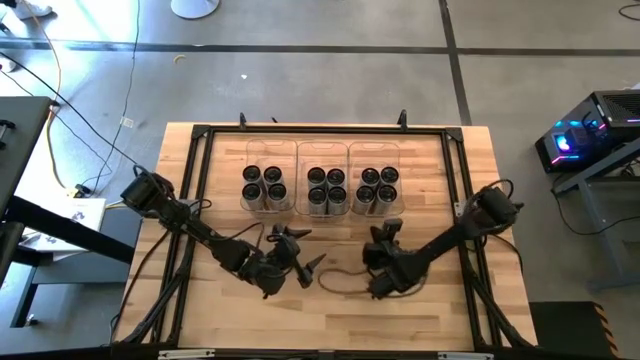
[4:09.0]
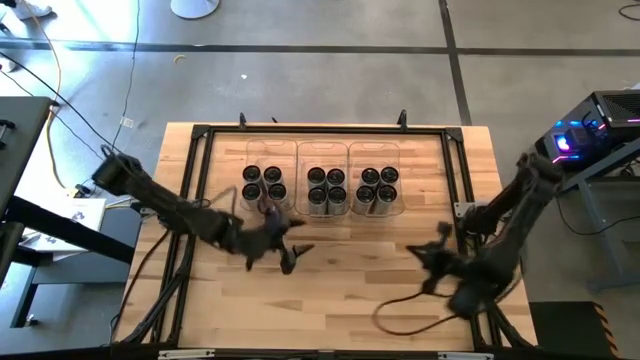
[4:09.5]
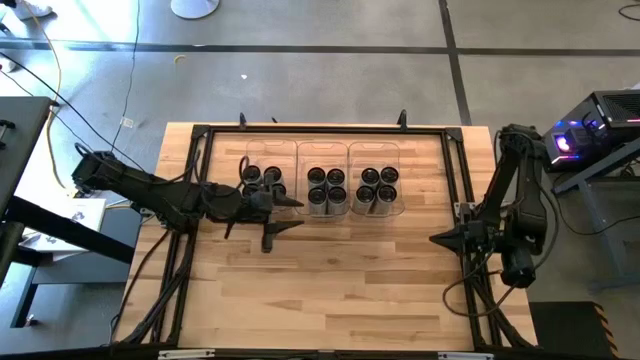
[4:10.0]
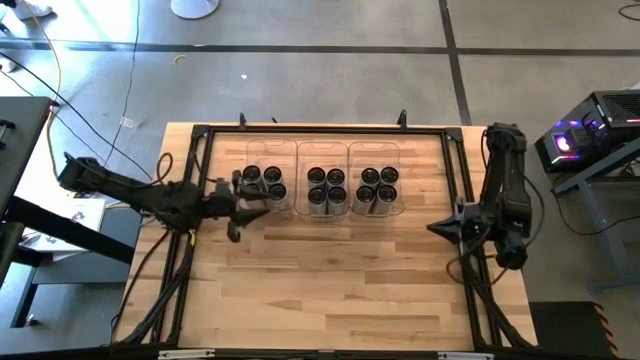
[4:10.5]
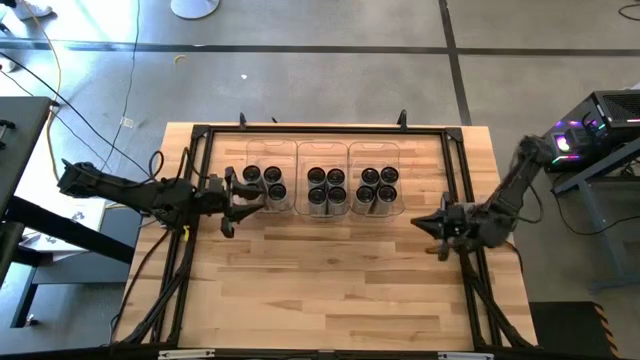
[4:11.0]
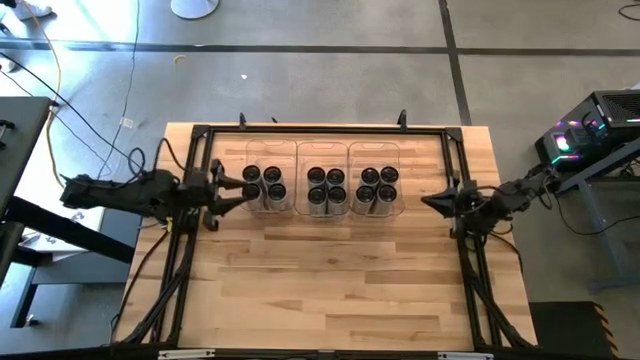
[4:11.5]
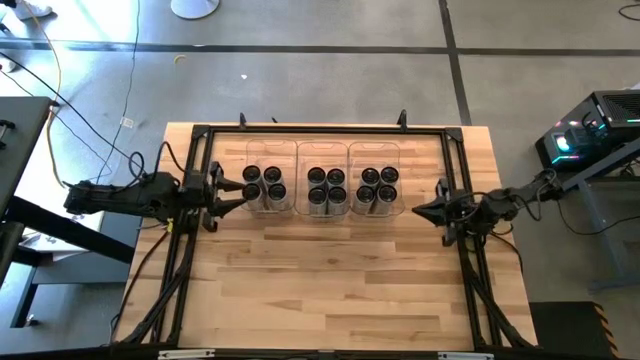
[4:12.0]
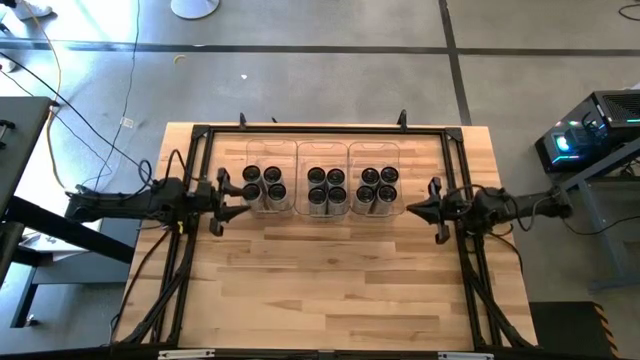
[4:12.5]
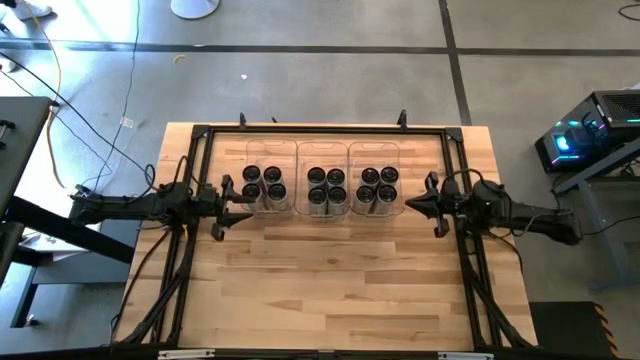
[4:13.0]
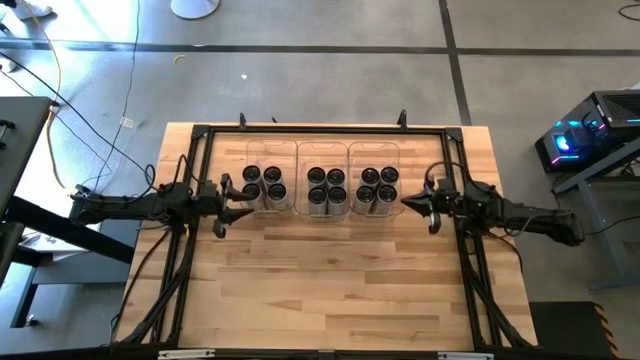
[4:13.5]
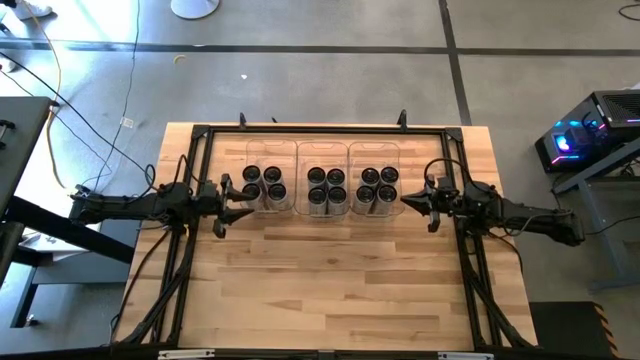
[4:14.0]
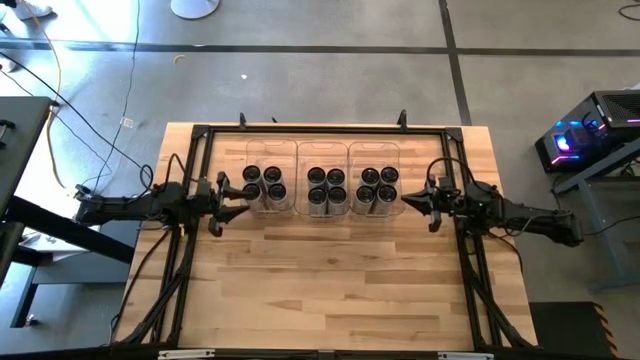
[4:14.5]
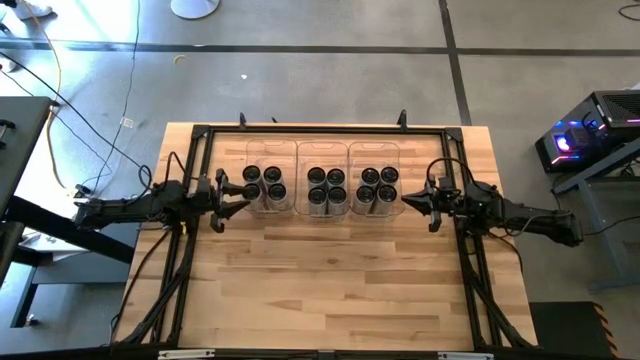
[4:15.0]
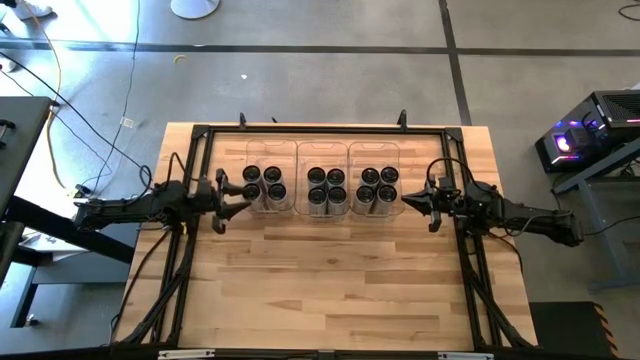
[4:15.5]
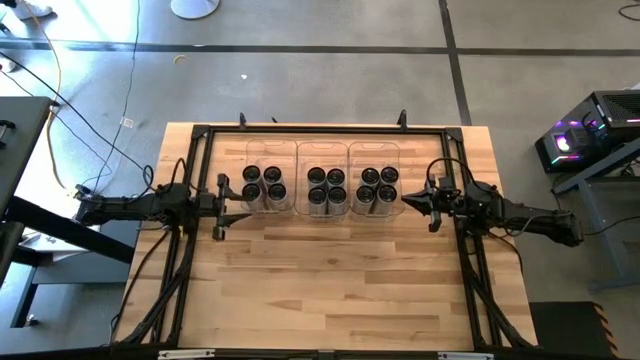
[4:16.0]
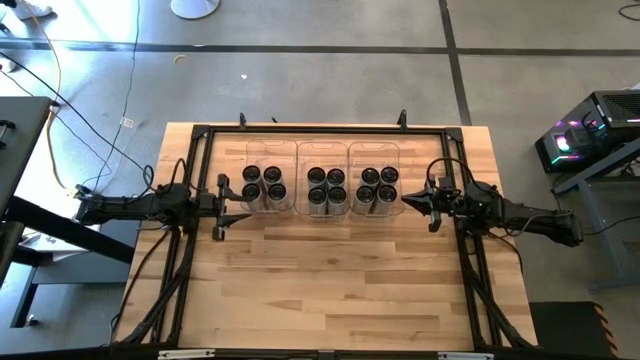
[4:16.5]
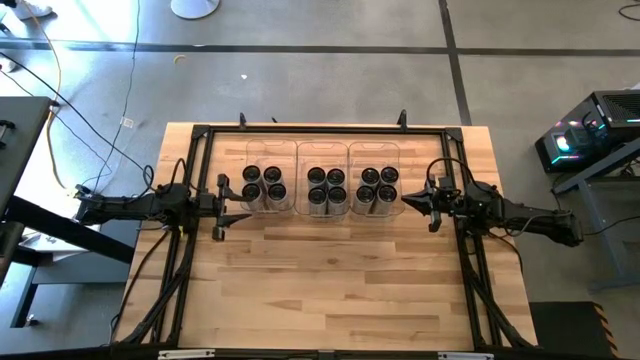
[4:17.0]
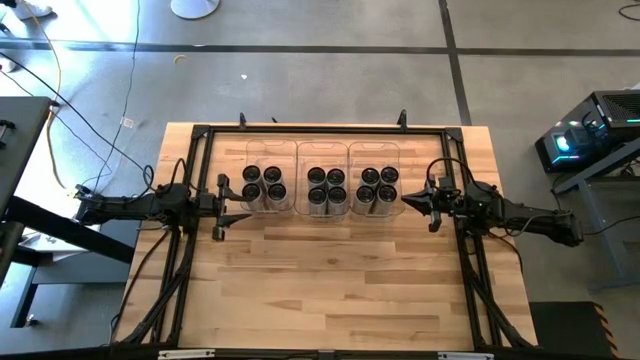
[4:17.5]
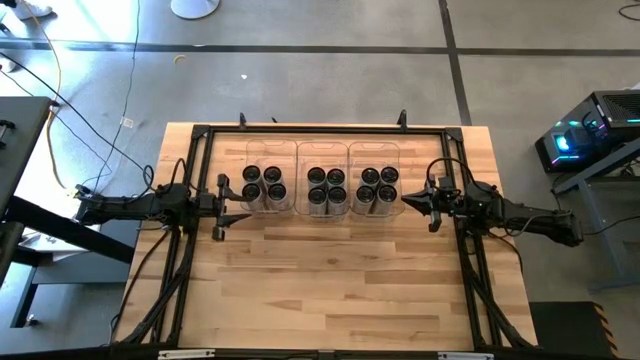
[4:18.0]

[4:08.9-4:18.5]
Task: Sort soda cans
Return to Home Position

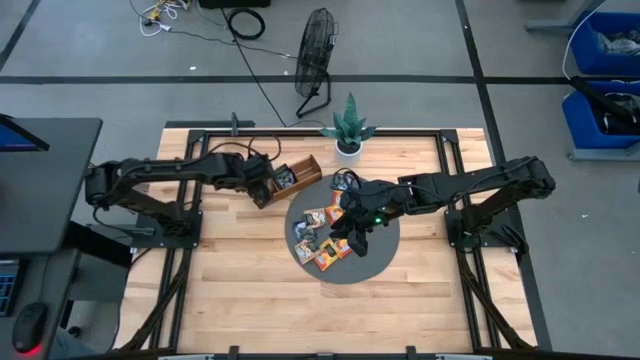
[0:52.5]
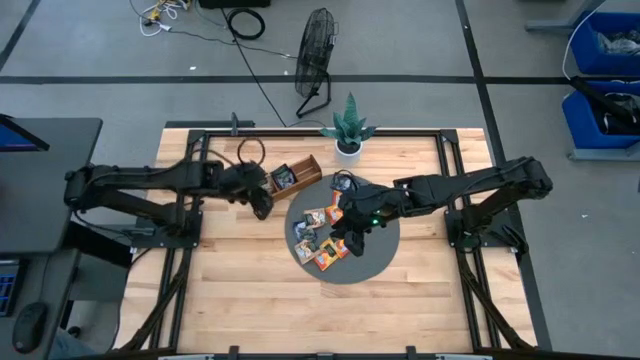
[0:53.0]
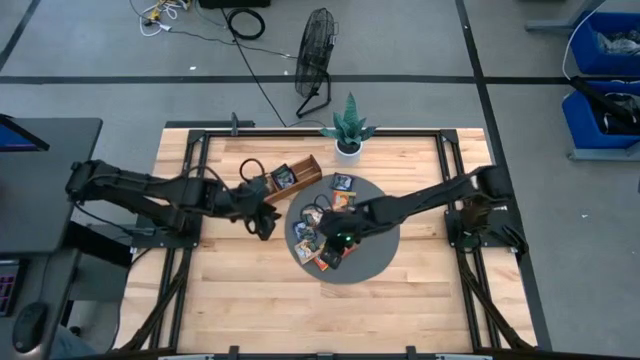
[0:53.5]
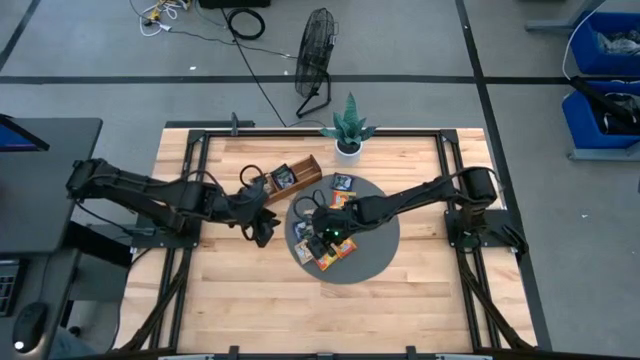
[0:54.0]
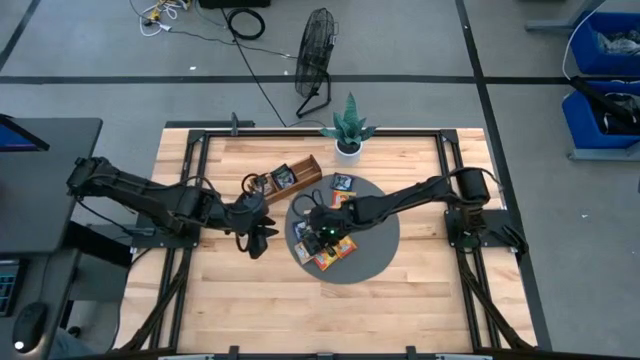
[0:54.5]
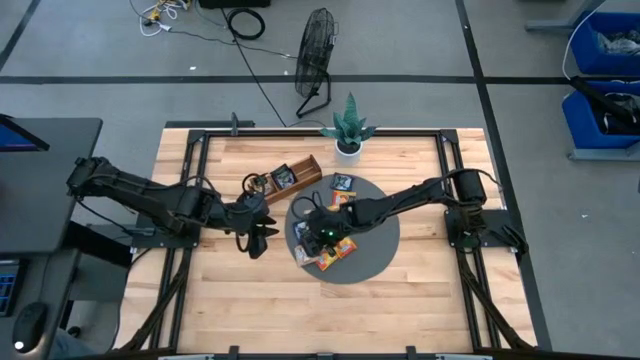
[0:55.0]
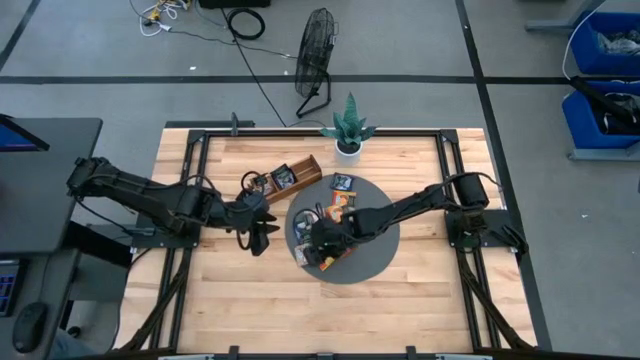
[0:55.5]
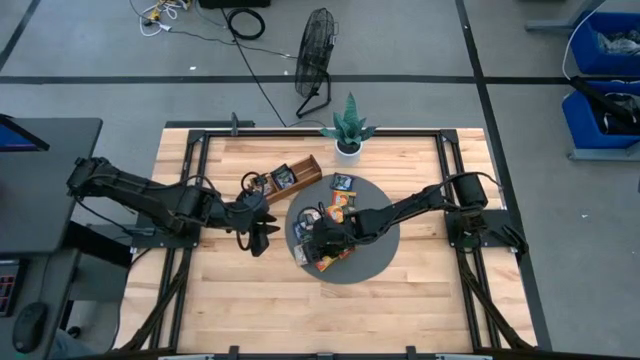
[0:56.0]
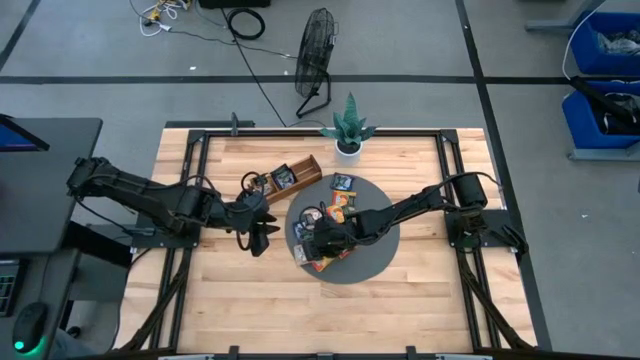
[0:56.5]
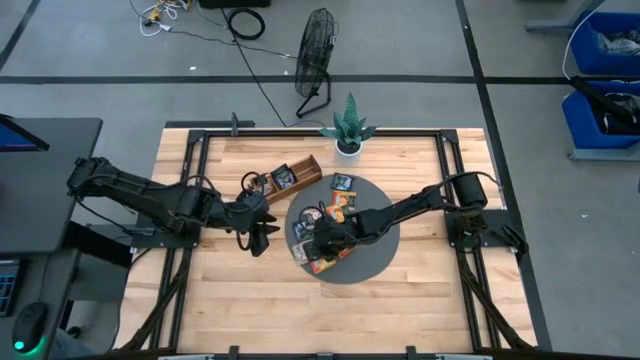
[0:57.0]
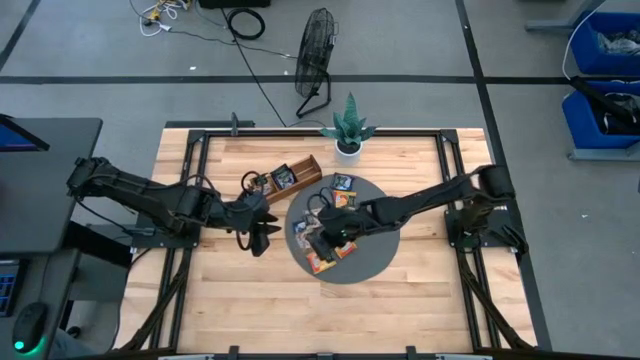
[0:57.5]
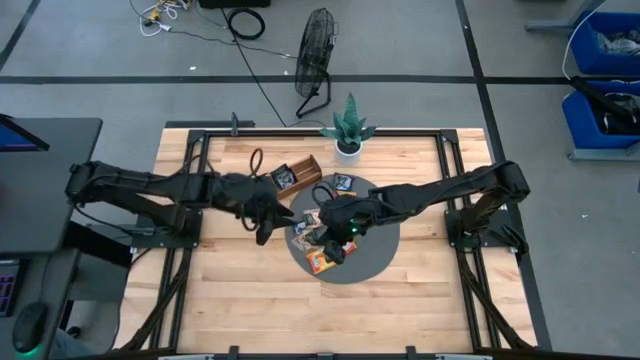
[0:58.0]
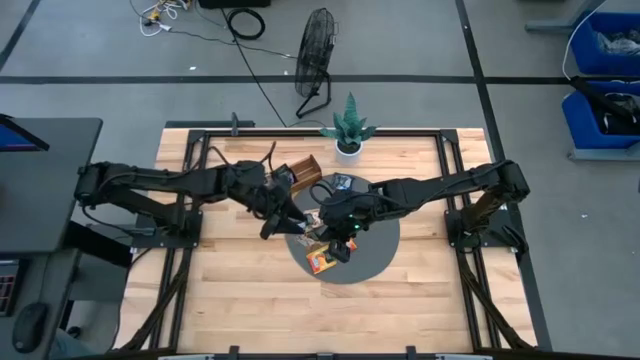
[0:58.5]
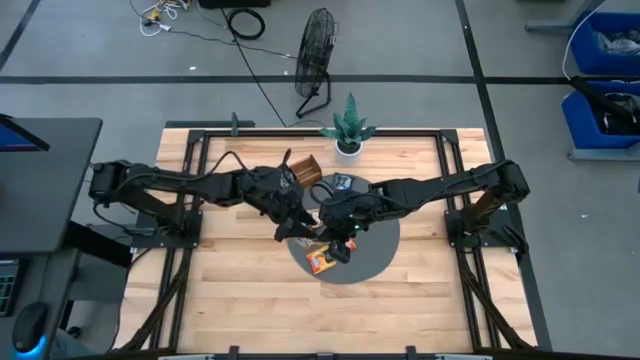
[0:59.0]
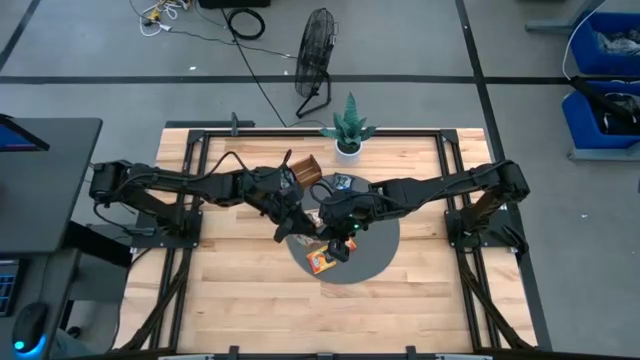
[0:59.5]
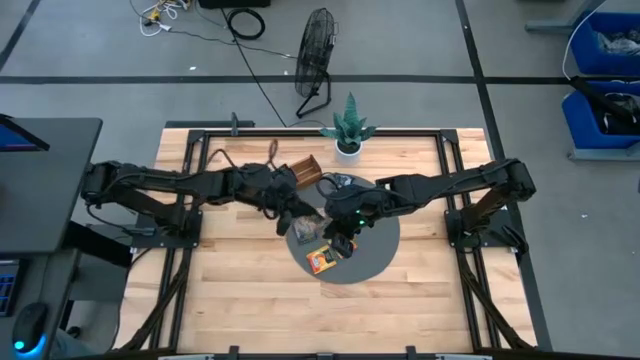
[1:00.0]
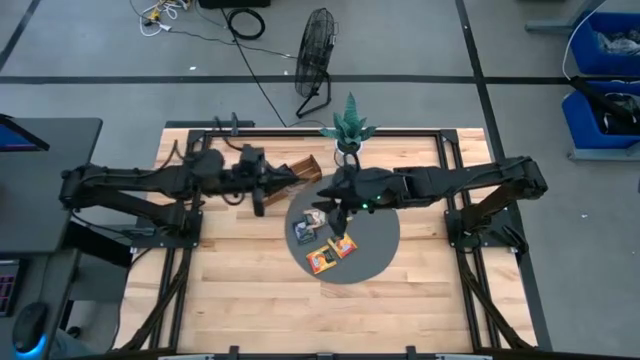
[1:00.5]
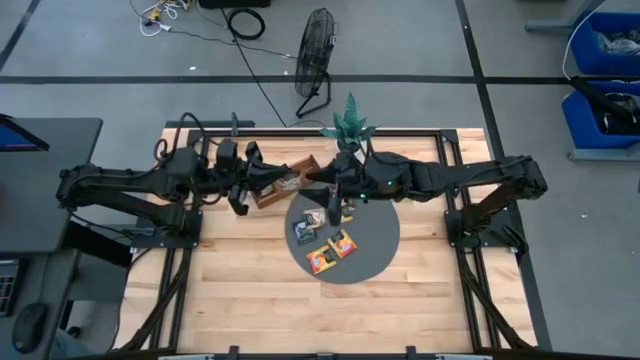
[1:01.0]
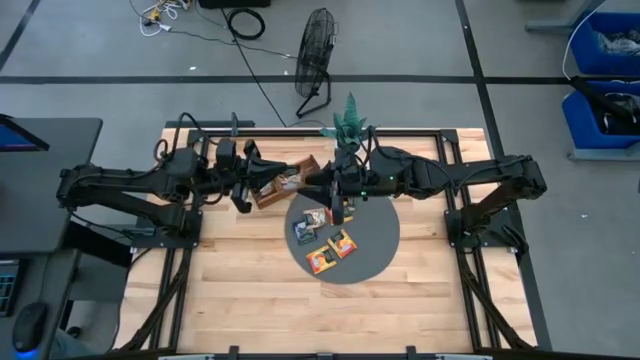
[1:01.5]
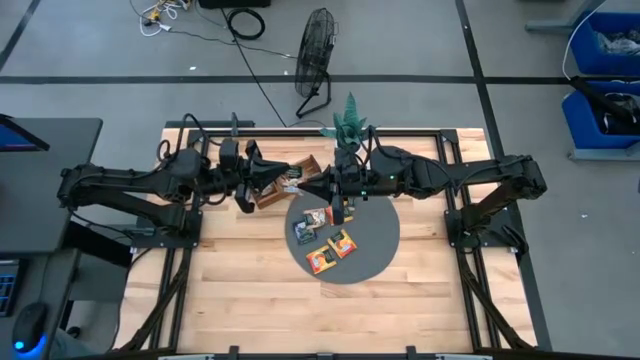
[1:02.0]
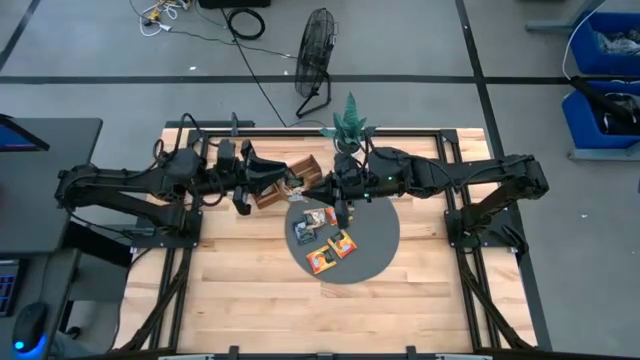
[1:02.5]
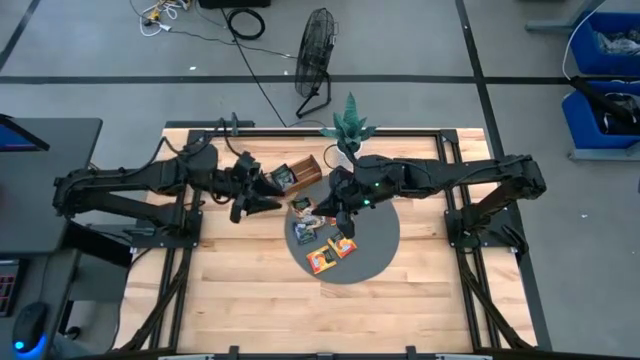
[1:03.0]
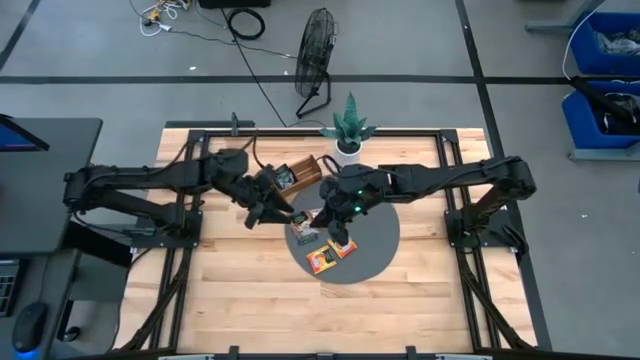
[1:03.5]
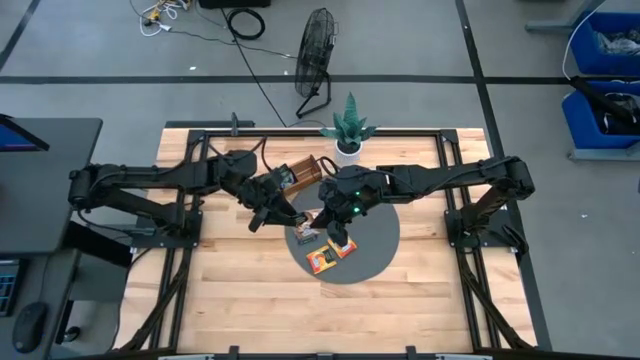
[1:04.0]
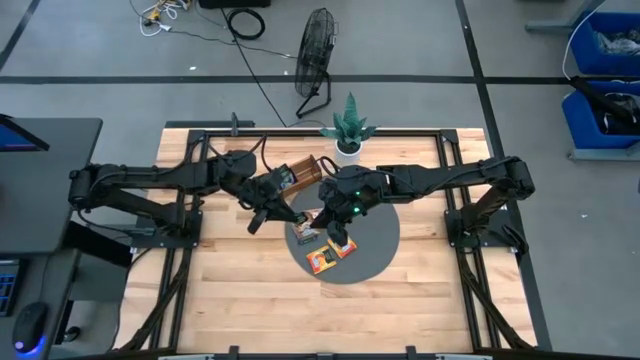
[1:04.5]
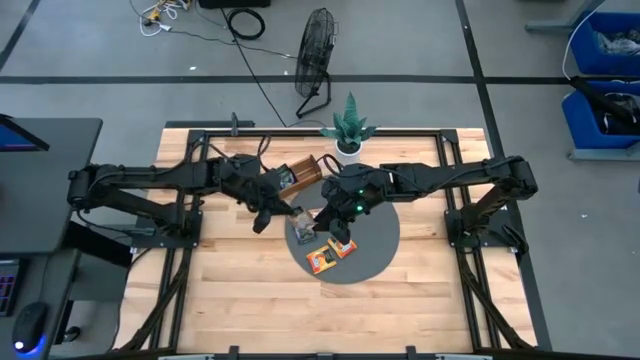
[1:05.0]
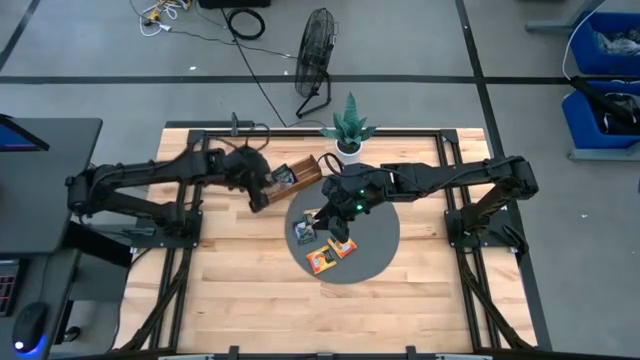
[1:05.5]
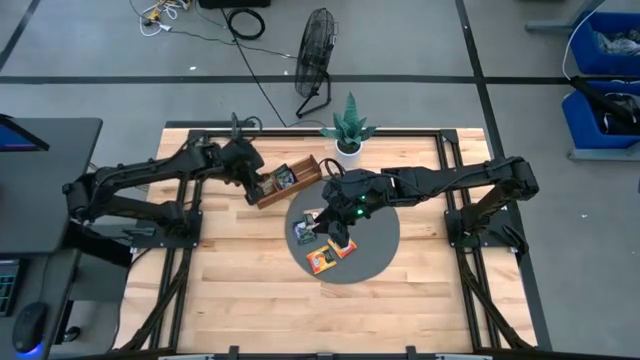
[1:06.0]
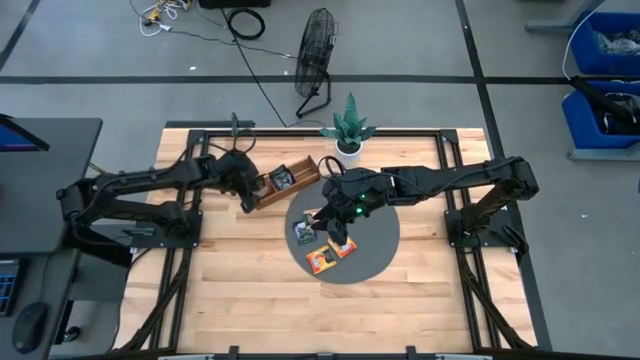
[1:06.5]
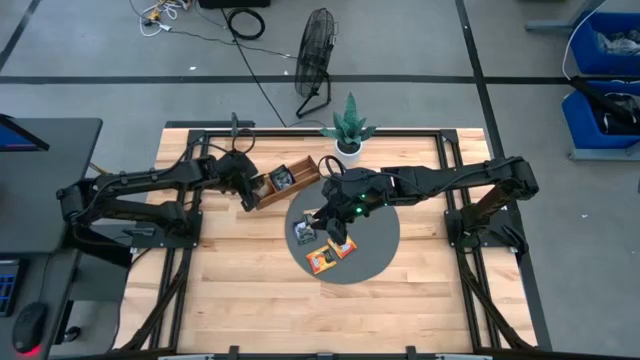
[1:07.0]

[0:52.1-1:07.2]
Task: Pick & Place Tea
Put the brown tea bag into the left section of the wooden organizer
